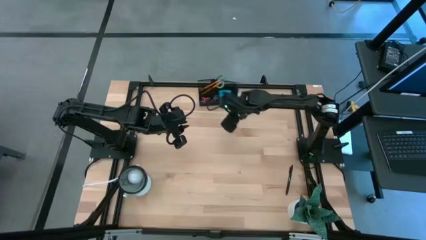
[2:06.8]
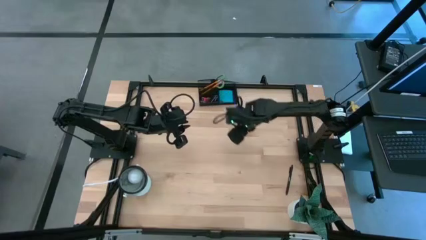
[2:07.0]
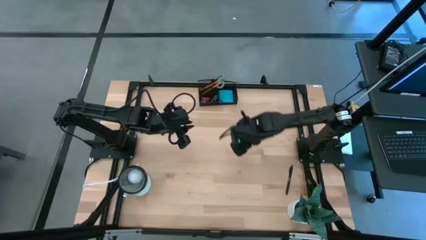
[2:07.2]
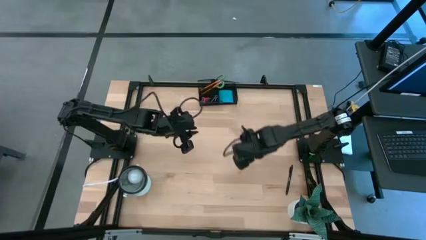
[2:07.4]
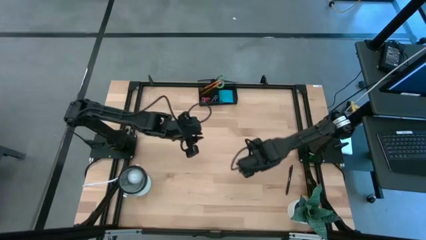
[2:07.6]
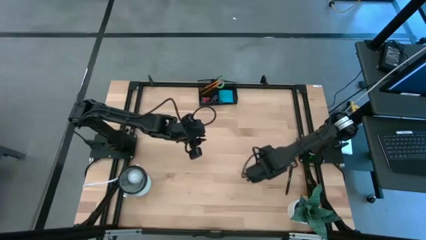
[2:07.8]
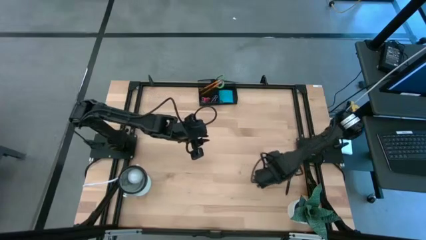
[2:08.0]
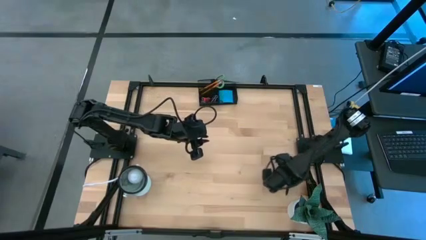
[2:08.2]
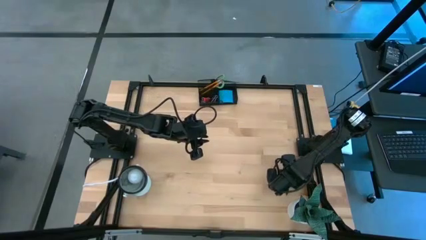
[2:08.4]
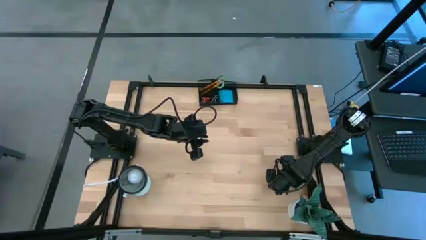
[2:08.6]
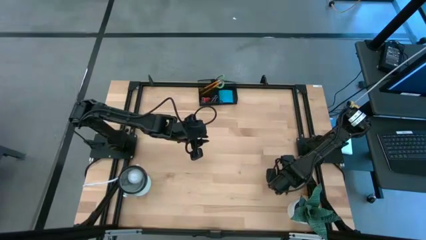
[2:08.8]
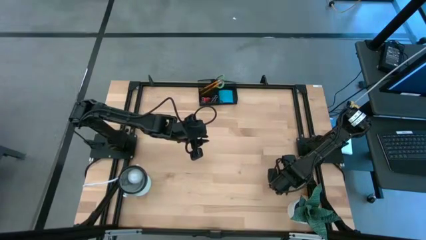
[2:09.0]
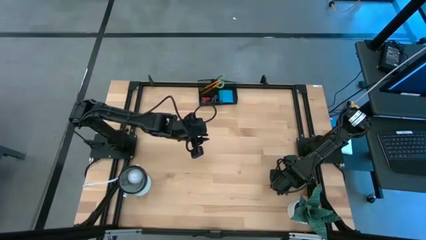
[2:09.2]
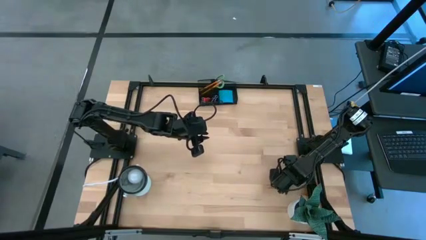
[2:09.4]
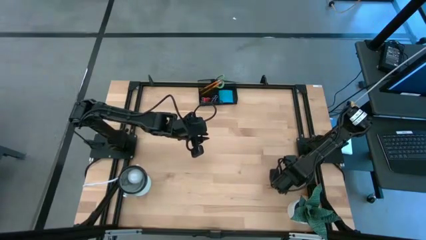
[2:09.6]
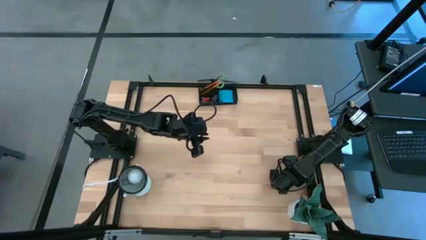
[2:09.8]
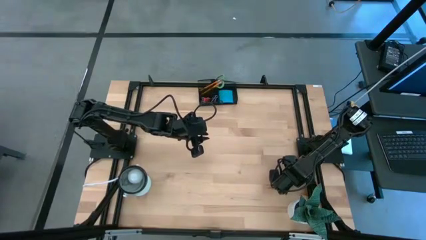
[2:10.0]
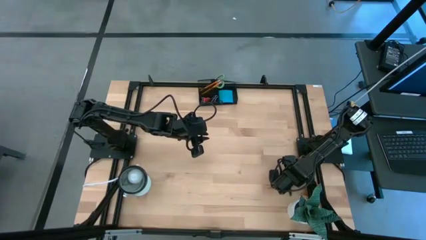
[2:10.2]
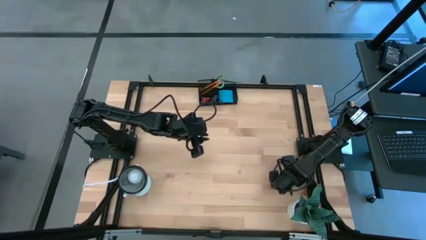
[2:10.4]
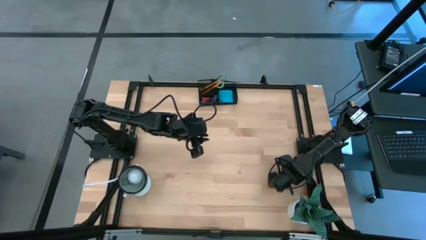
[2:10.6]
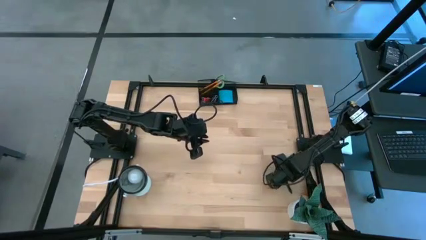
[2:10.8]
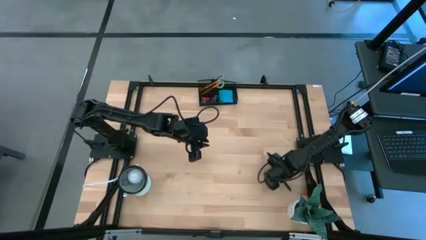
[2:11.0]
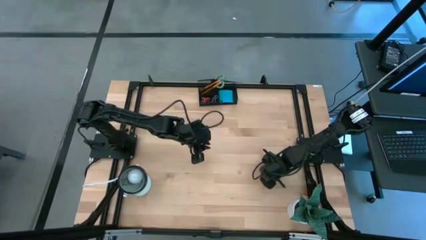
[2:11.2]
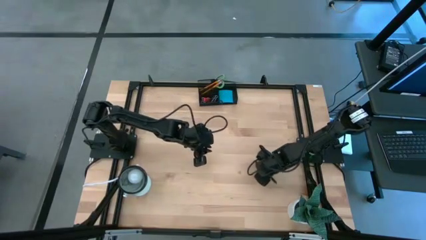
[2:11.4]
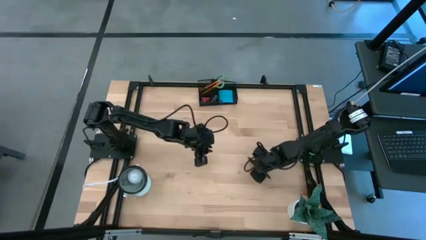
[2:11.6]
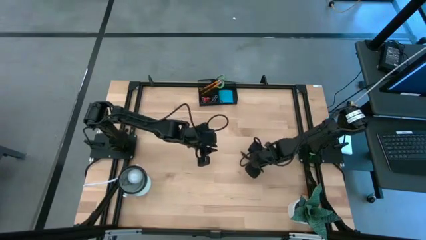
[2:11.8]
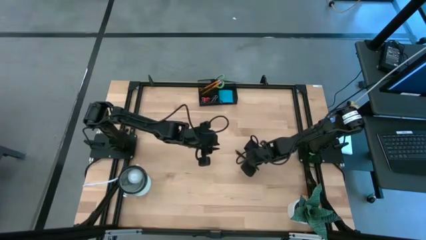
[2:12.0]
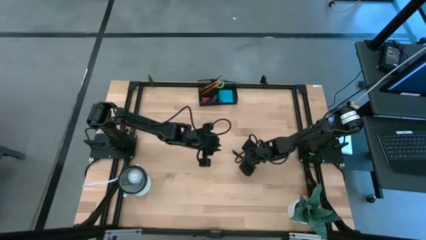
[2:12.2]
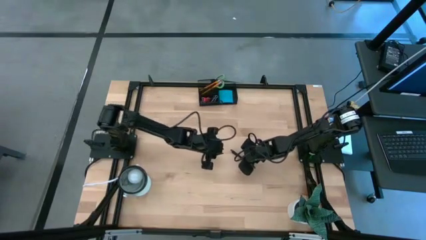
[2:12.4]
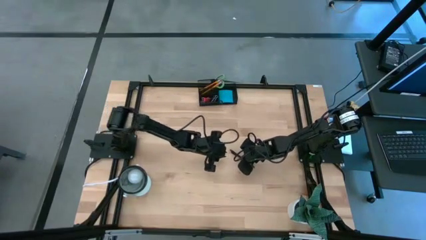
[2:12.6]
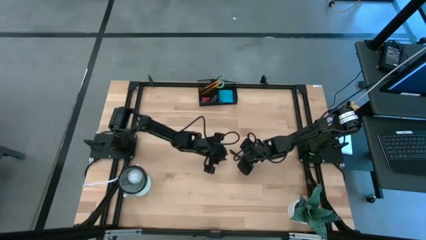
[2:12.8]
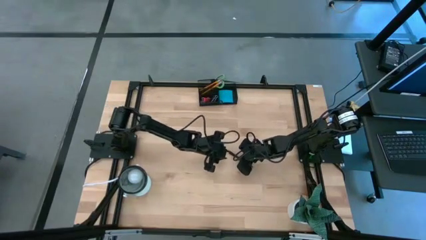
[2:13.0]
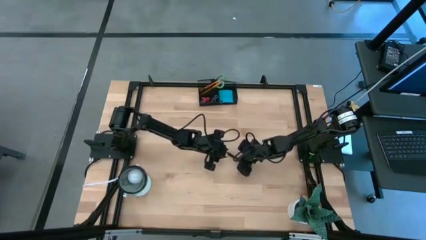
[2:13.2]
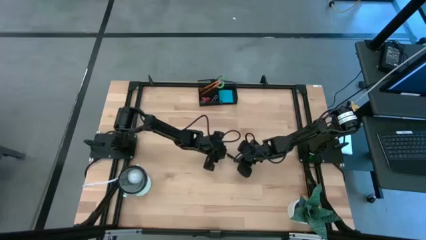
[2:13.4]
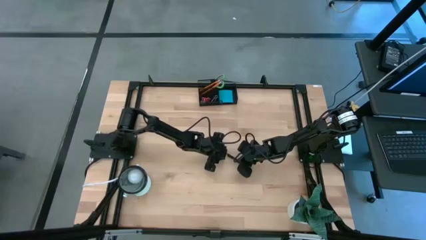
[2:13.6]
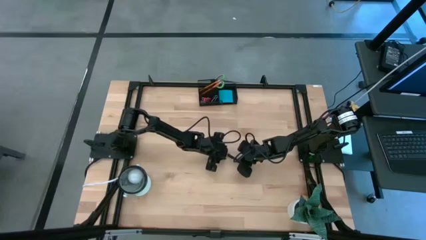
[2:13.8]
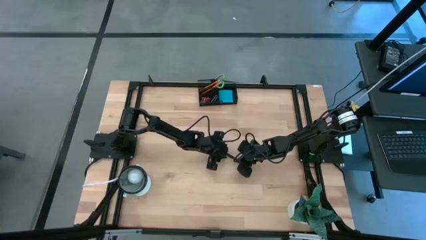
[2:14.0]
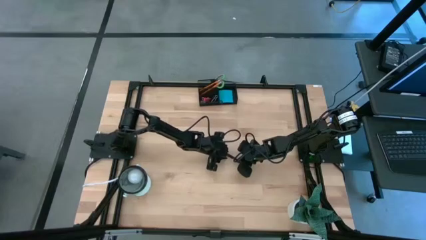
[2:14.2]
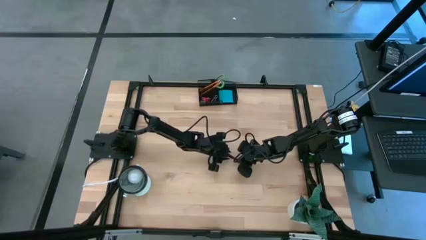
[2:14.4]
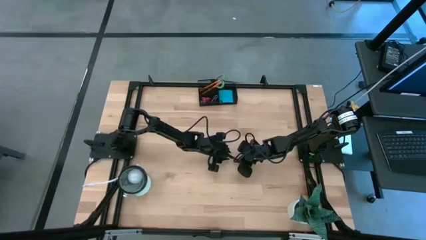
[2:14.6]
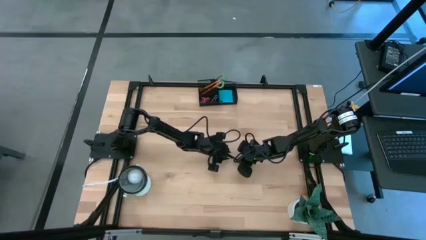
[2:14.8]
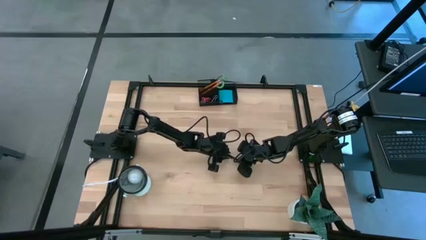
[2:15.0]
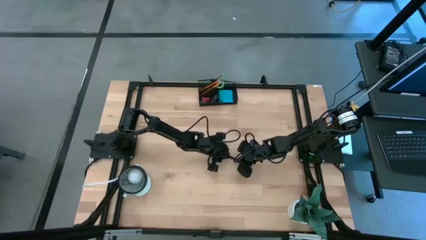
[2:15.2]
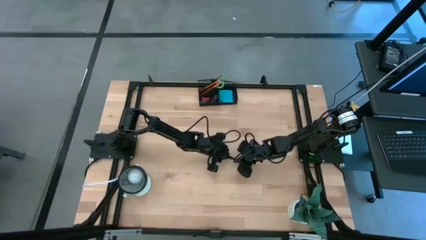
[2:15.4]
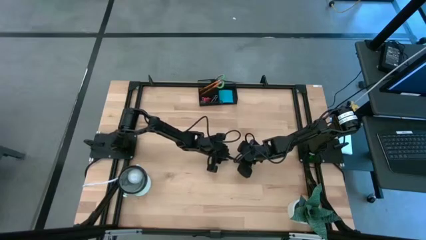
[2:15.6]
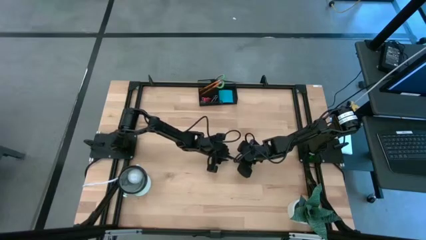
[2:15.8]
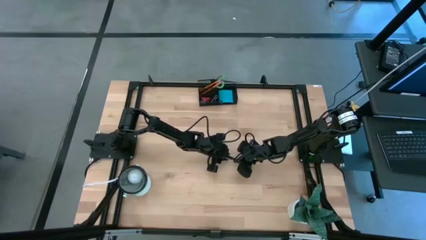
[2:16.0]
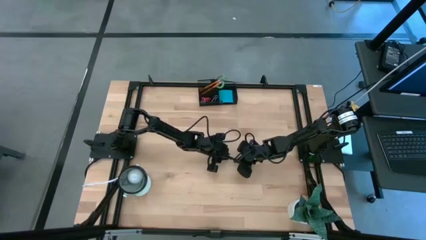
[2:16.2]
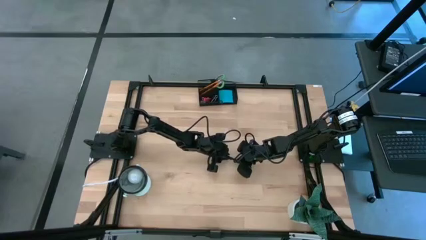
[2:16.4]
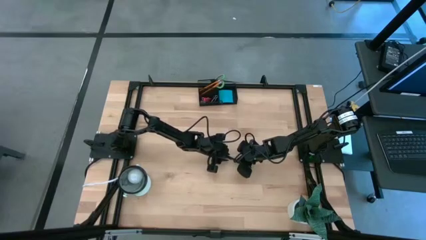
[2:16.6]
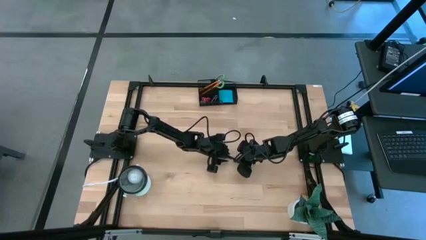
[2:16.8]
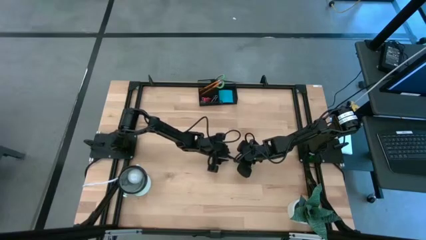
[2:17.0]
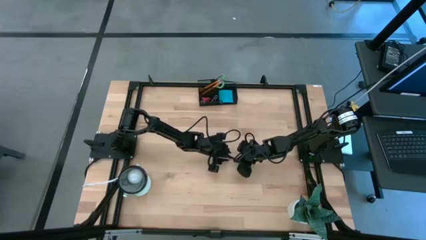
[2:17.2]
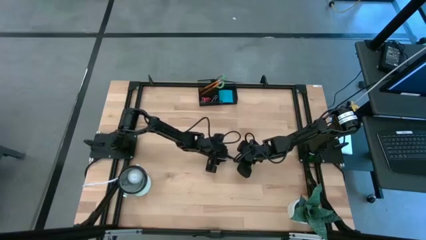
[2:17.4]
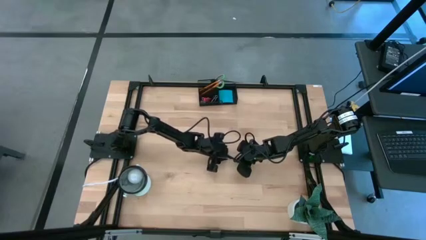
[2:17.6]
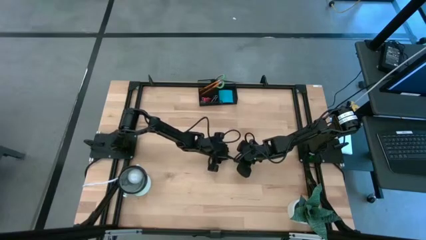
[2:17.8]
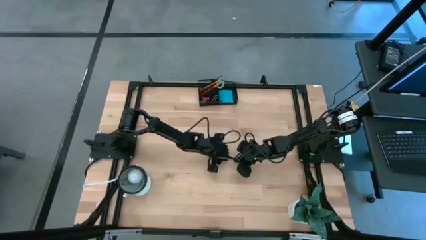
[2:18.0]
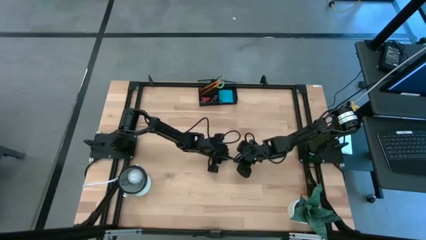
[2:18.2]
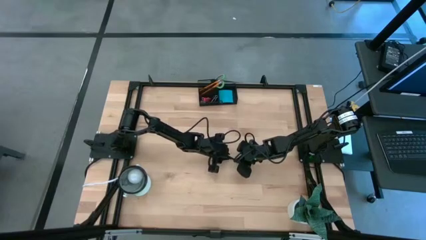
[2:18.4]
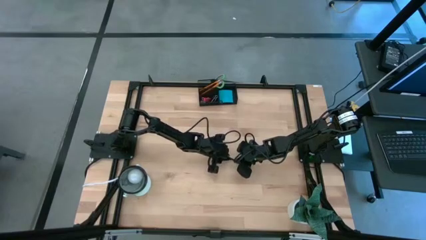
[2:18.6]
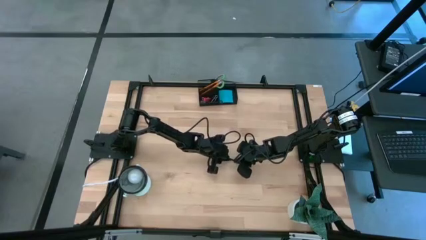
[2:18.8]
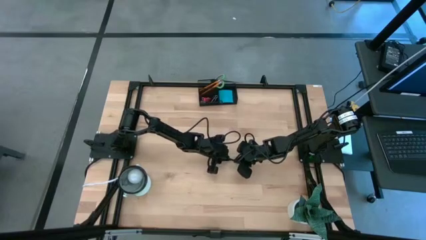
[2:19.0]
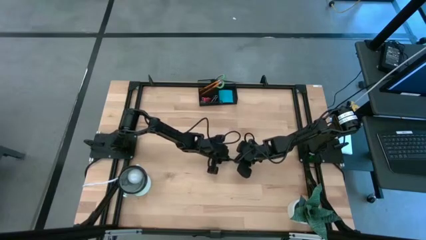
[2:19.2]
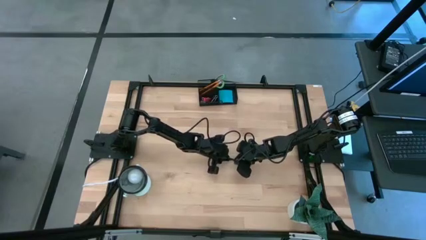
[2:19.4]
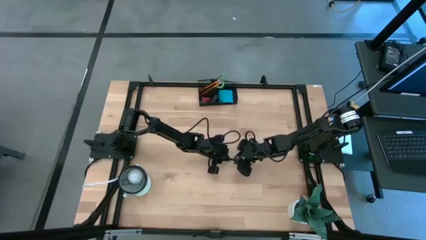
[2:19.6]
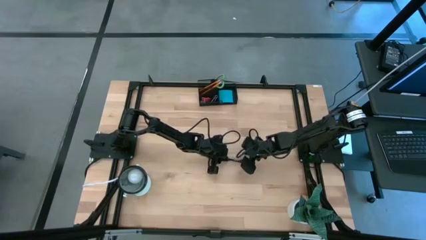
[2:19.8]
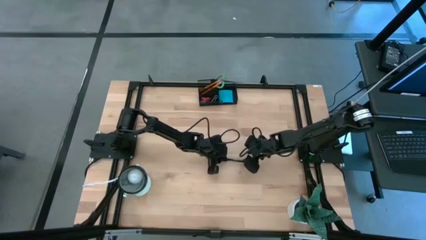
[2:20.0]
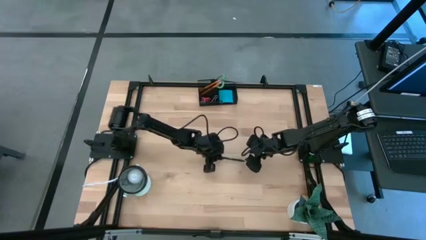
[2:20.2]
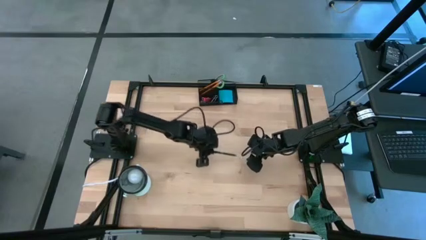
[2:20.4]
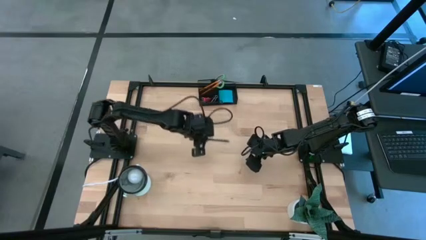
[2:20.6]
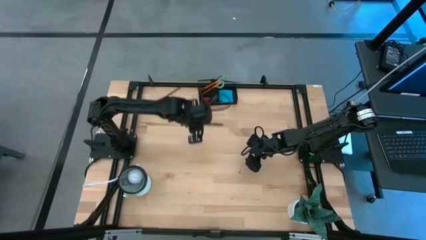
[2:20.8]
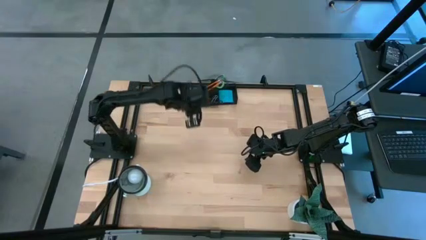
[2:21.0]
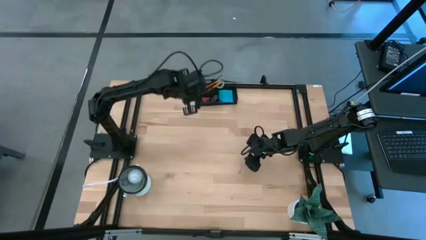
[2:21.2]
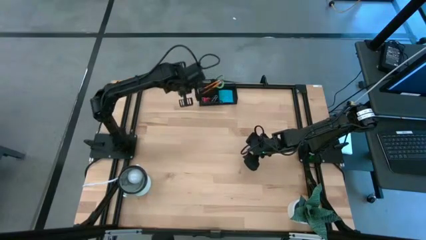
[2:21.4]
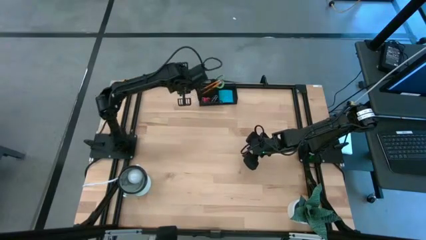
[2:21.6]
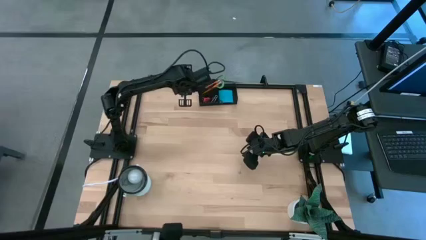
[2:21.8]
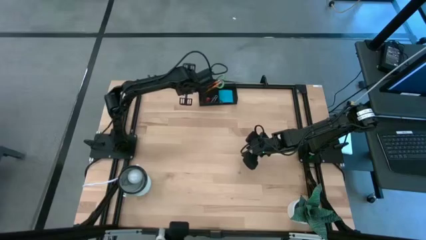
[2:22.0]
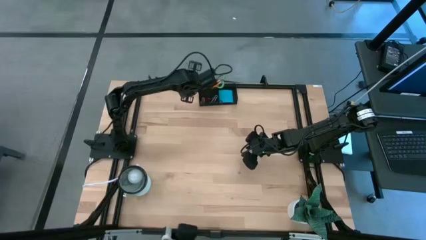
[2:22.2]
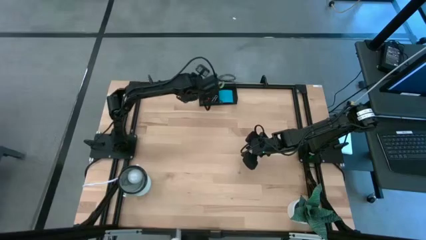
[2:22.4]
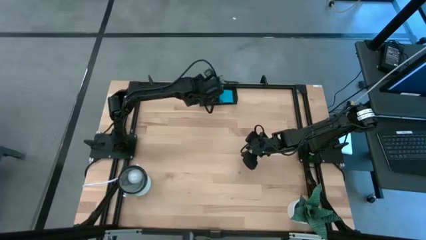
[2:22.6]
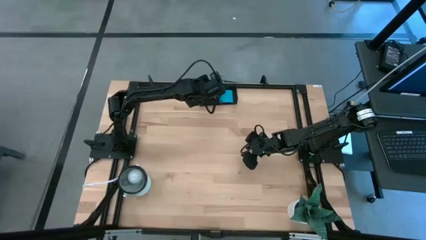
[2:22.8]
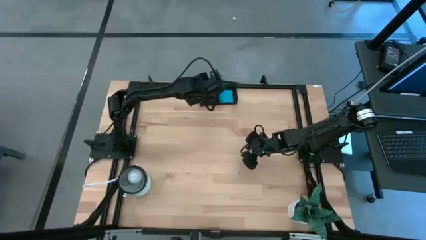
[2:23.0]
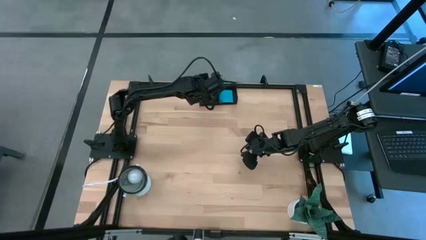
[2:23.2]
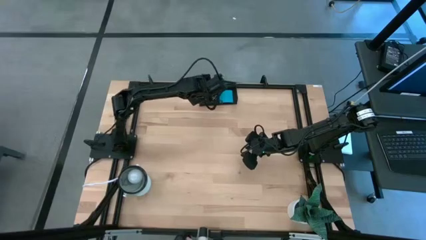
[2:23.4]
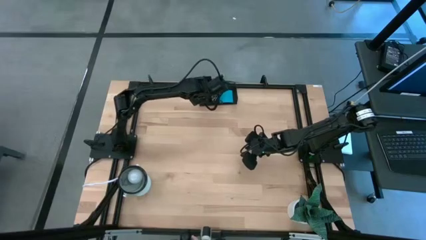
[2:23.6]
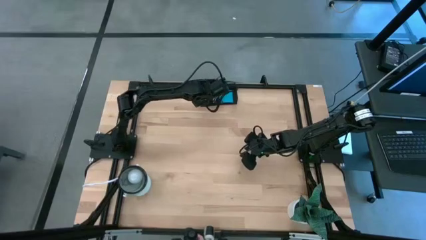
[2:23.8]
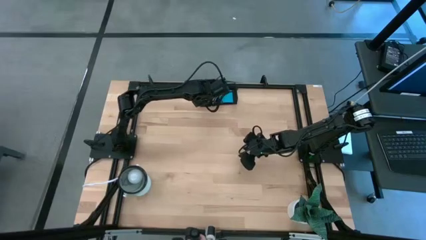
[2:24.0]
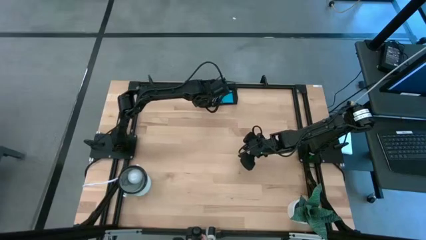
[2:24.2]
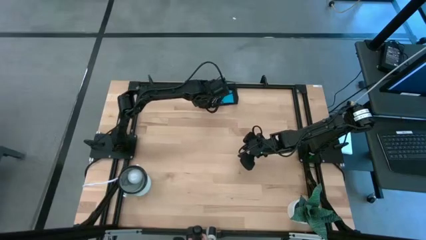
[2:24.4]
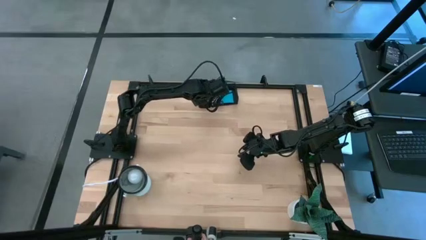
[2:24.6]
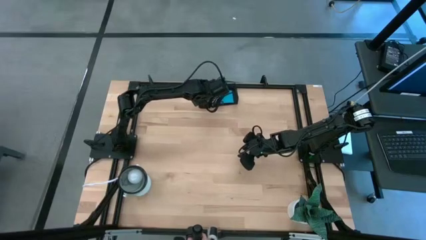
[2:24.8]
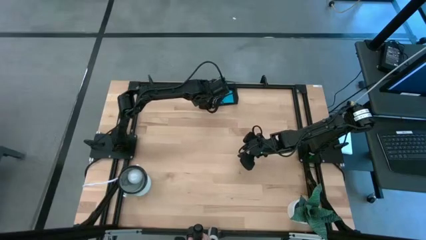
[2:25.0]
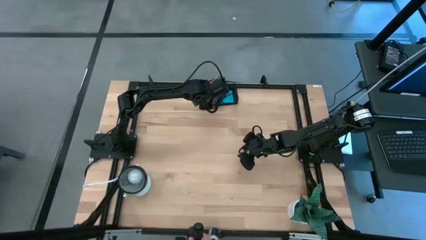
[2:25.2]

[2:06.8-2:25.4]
Task: Pick and place office supplies into organizer
Put the black pen into the desk organizer
